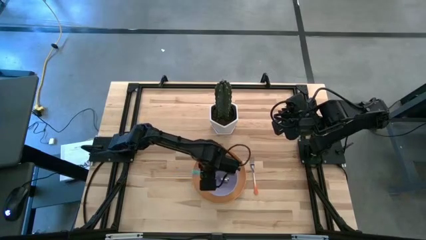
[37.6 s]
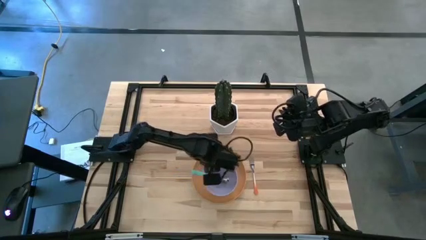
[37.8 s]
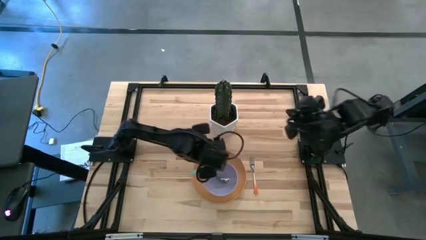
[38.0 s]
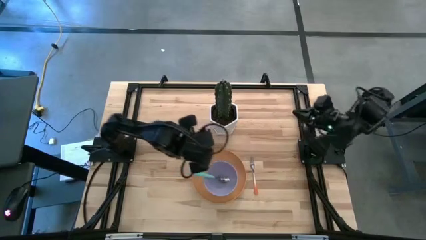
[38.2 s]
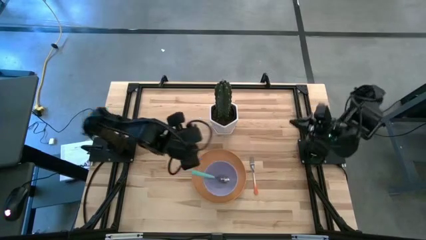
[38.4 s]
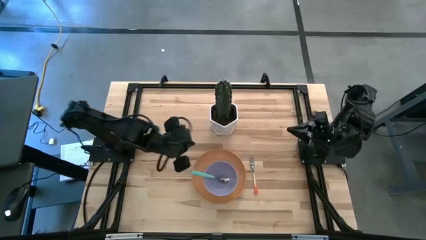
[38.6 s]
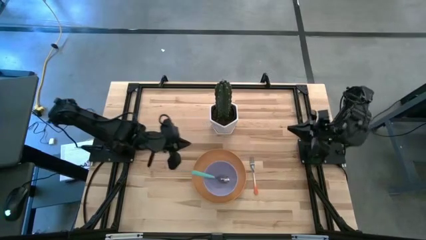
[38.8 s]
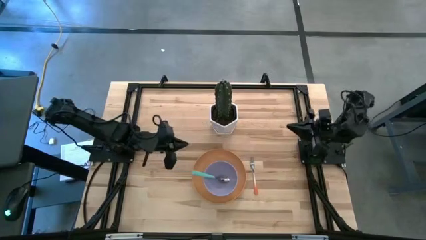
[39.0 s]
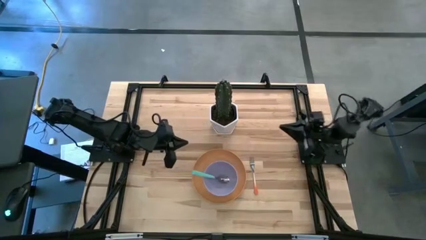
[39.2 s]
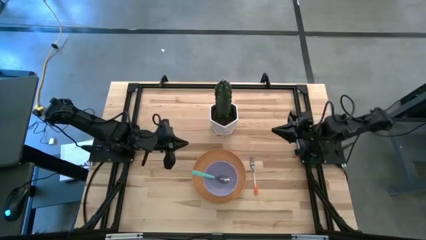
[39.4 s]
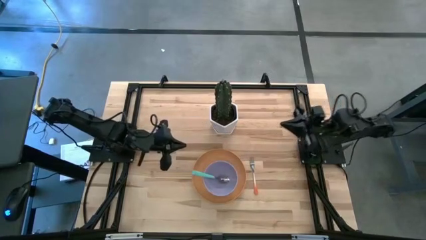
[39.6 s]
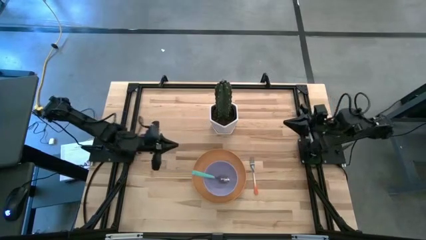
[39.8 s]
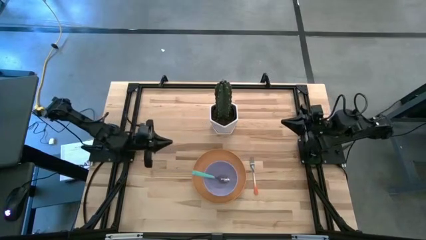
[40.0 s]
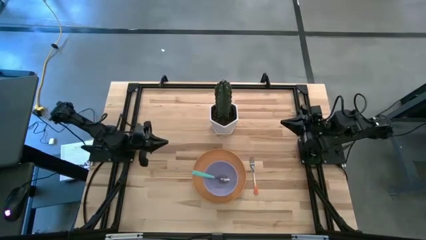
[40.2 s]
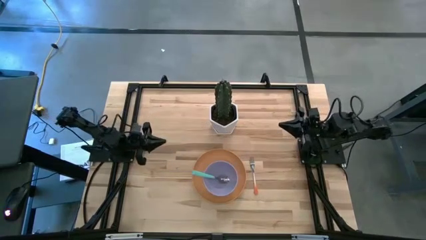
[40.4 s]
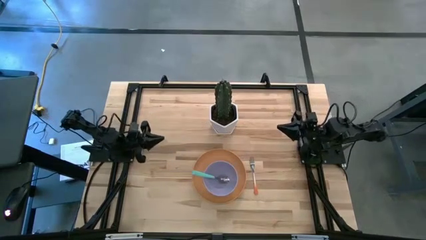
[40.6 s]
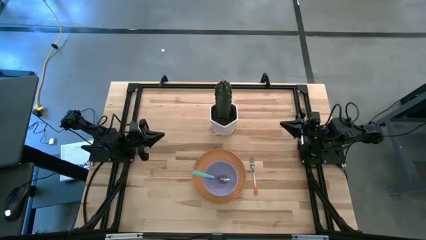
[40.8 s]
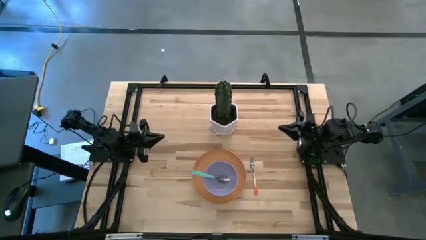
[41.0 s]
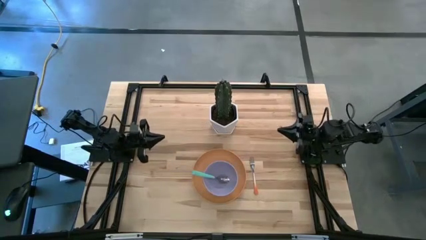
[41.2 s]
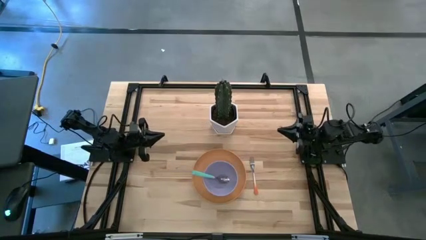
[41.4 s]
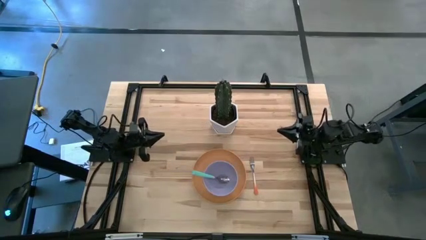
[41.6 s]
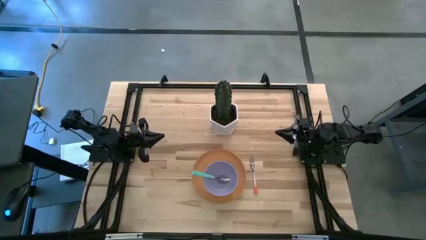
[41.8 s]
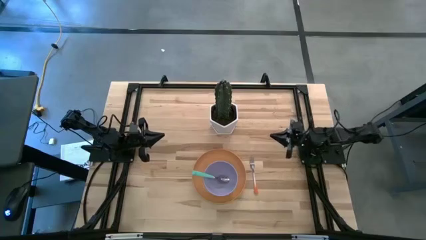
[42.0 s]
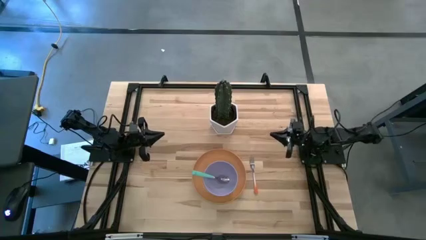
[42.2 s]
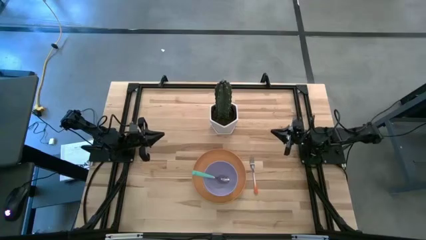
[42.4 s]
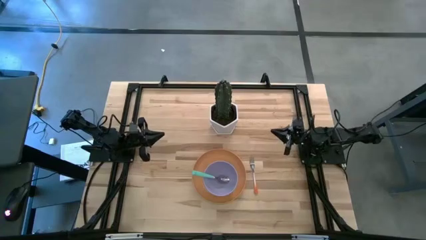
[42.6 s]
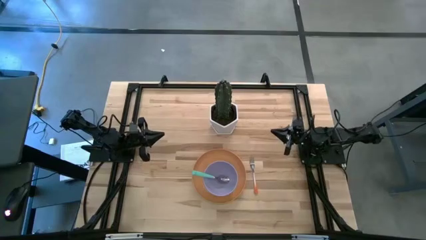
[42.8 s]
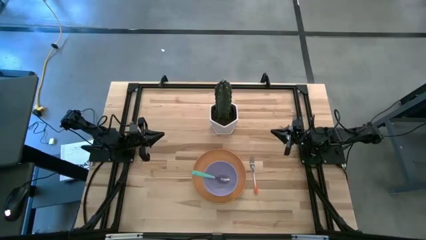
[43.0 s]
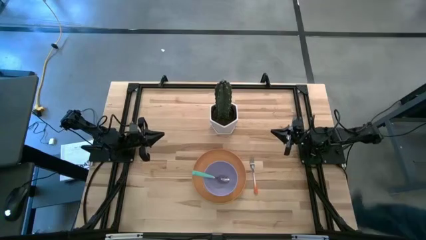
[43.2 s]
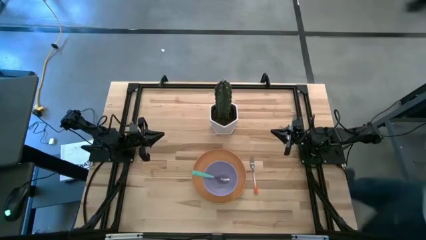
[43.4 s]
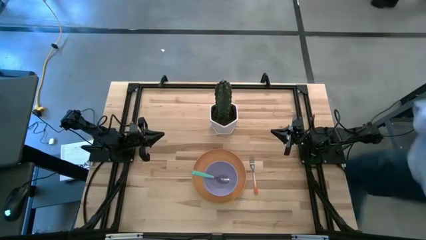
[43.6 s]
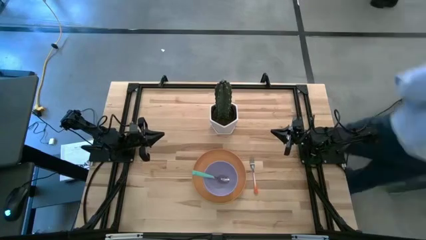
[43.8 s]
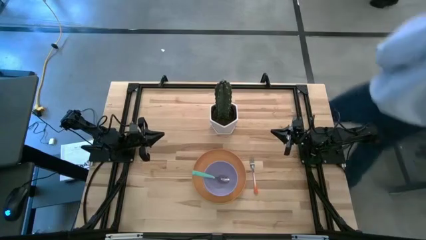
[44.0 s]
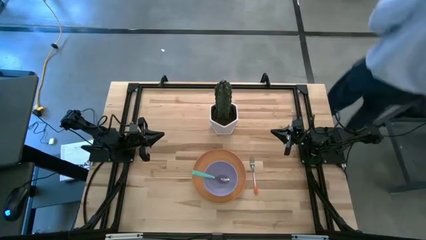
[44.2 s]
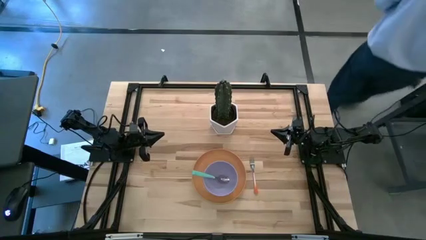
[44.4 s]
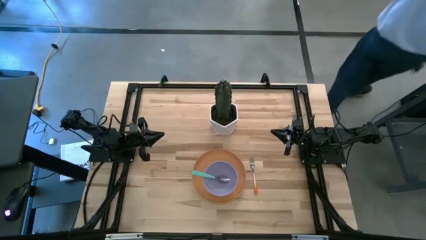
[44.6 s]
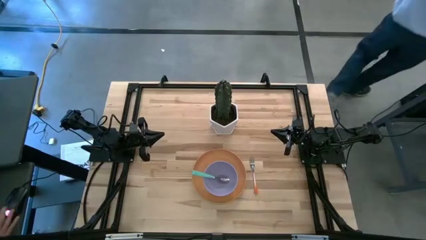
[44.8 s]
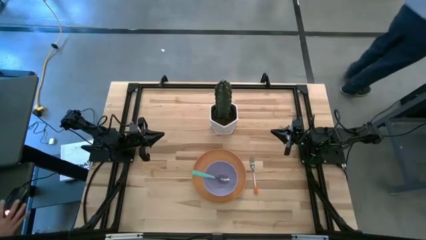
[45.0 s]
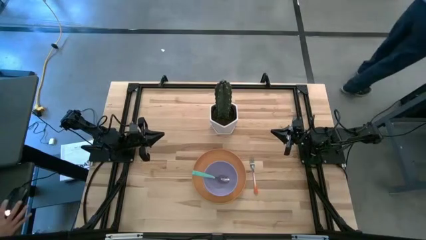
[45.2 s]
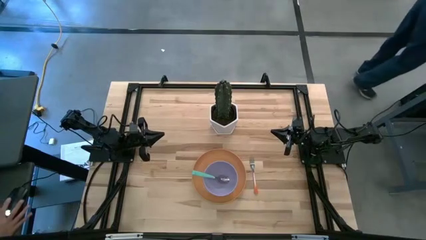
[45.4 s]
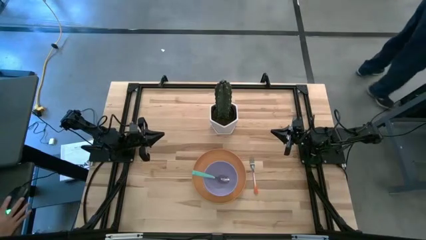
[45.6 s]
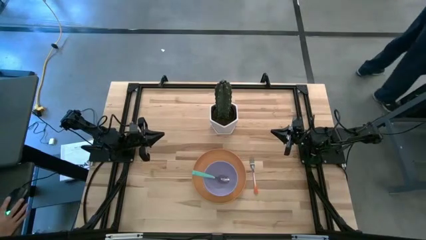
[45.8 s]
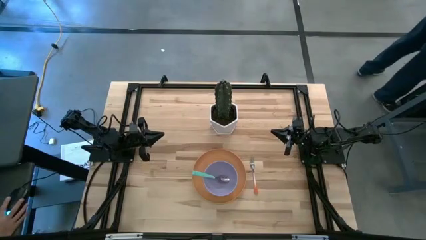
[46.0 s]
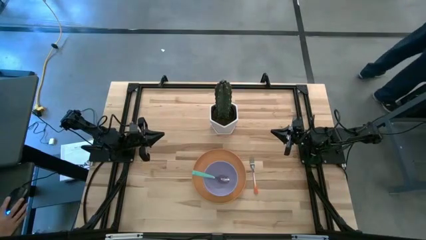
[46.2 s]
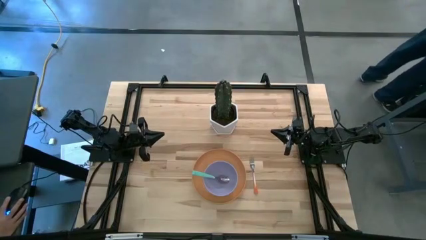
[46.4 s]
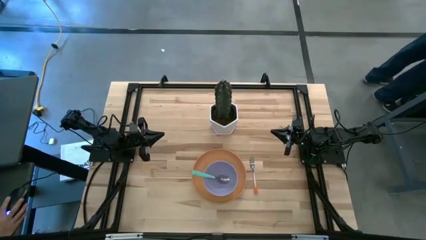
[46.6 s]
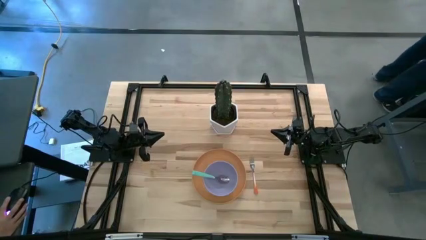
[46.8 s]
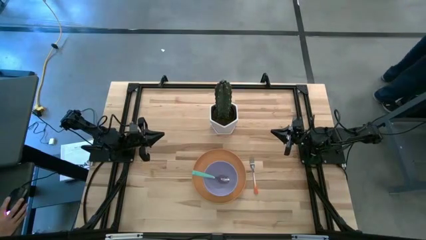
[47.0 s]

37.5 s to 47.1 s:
Task: Set table place
Return to Home Position
